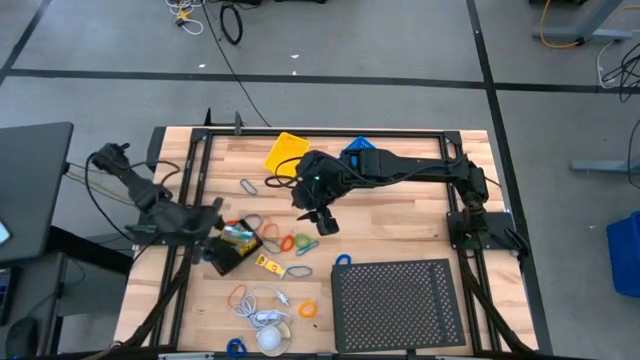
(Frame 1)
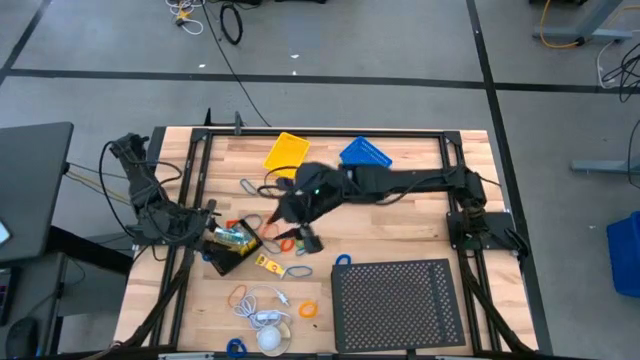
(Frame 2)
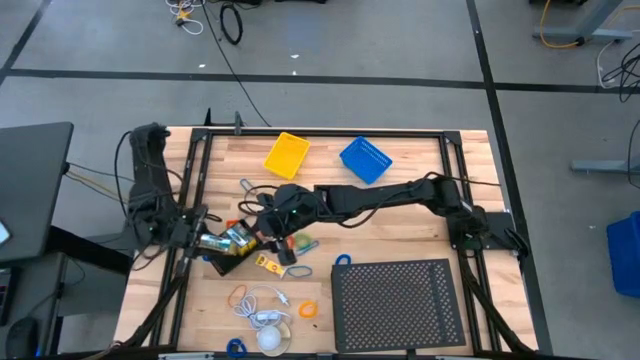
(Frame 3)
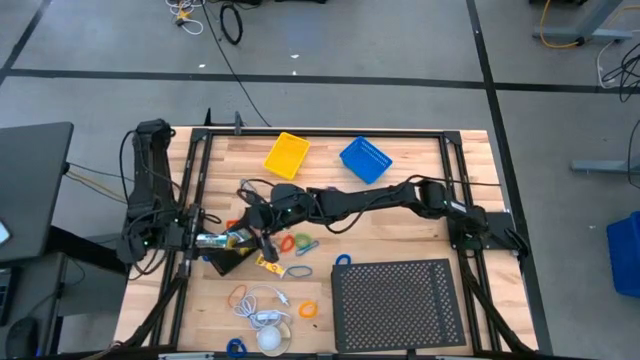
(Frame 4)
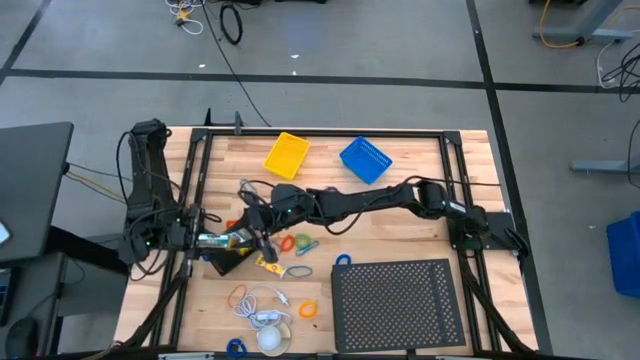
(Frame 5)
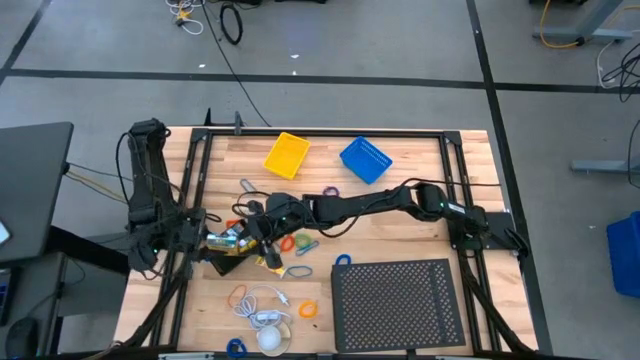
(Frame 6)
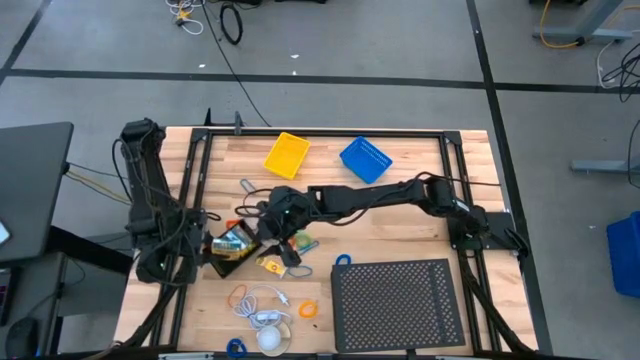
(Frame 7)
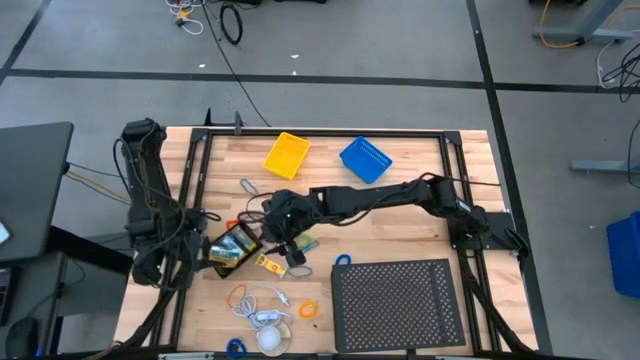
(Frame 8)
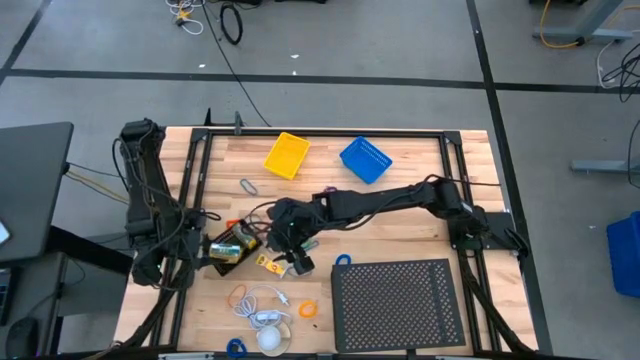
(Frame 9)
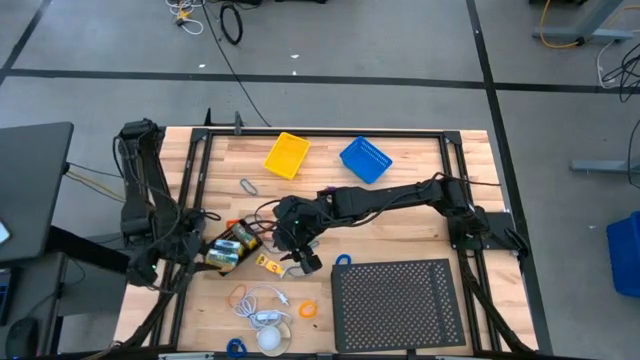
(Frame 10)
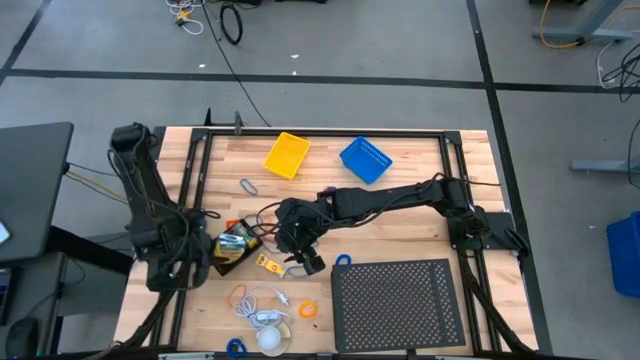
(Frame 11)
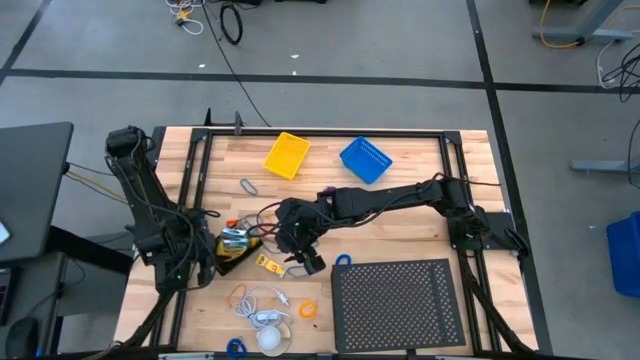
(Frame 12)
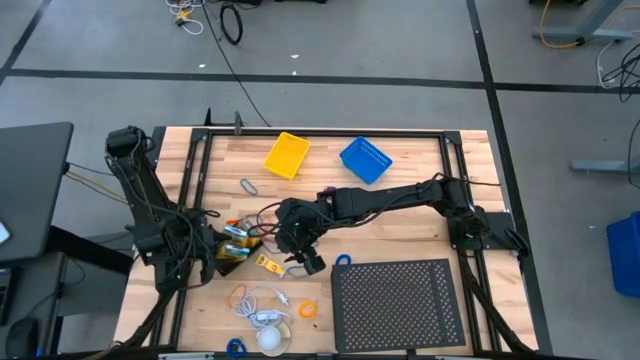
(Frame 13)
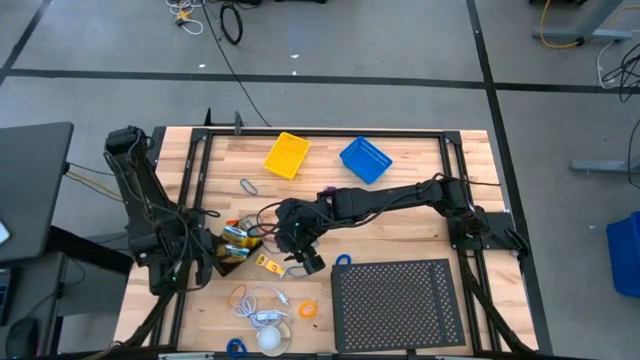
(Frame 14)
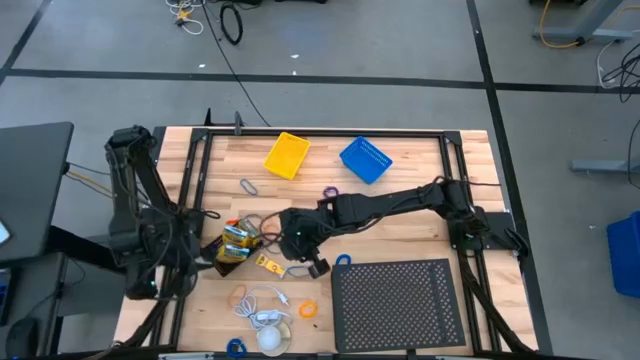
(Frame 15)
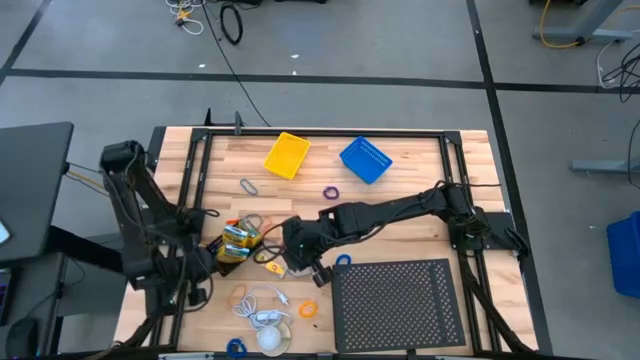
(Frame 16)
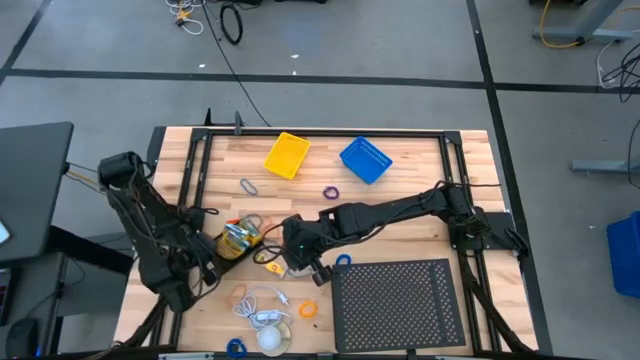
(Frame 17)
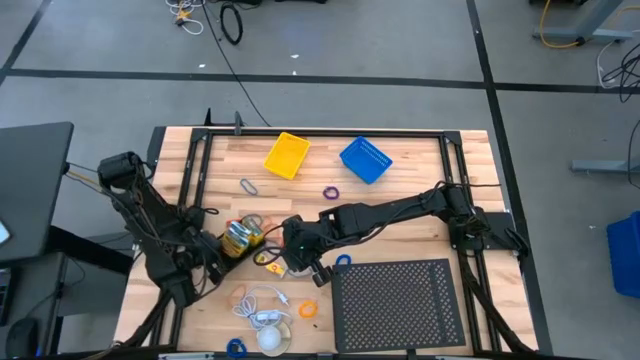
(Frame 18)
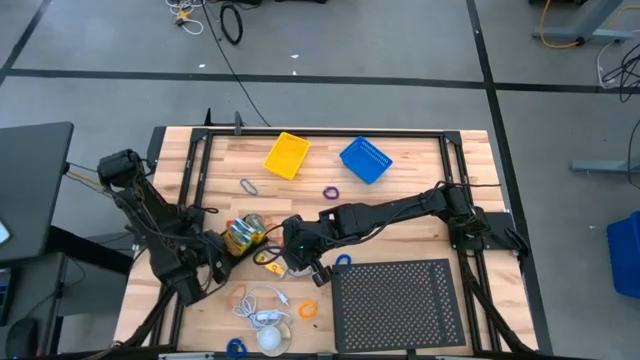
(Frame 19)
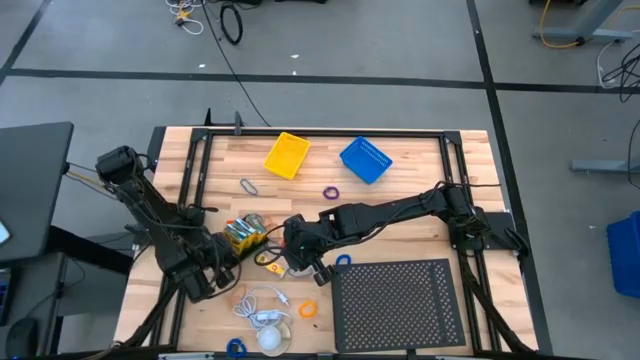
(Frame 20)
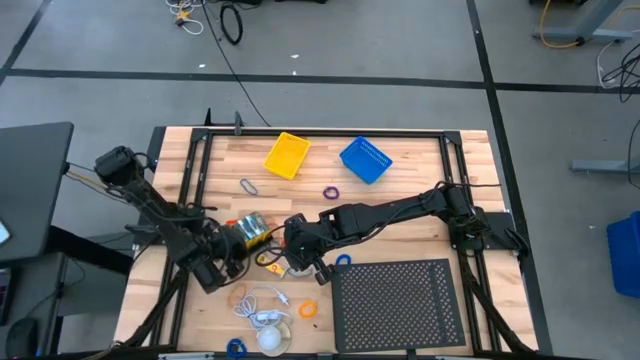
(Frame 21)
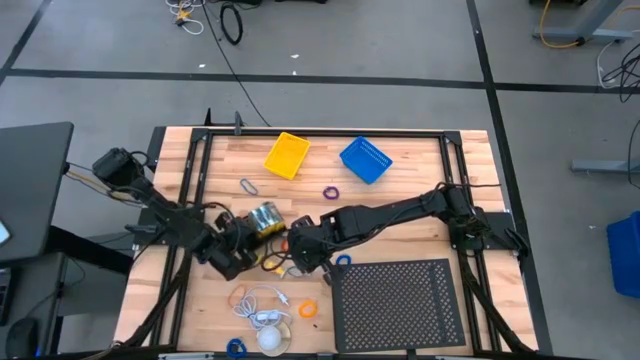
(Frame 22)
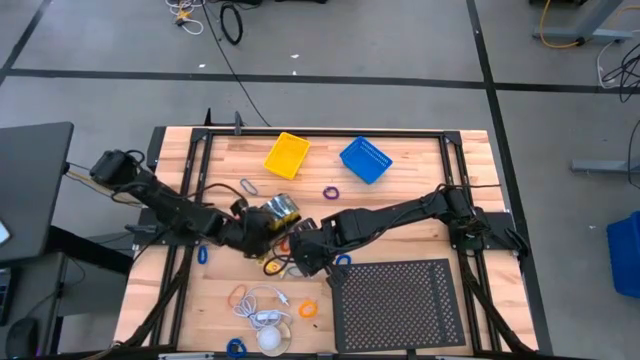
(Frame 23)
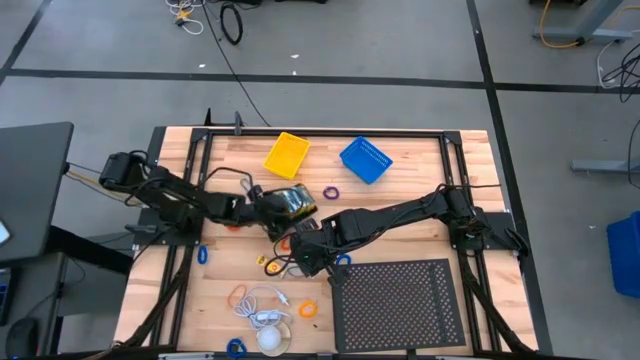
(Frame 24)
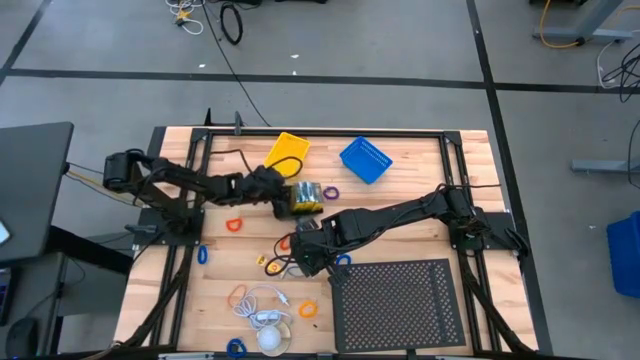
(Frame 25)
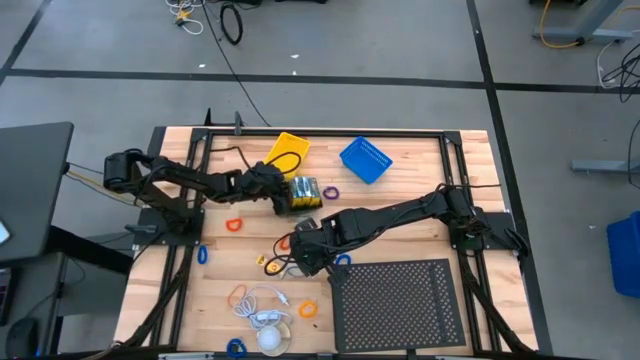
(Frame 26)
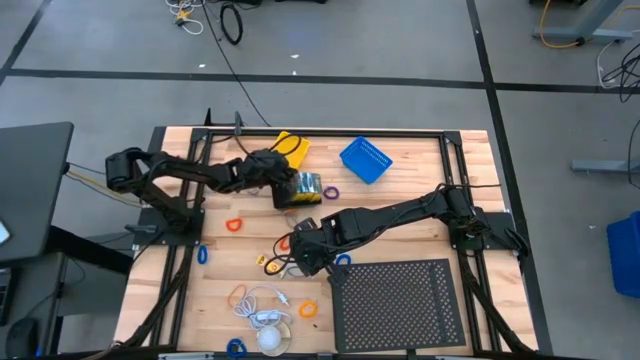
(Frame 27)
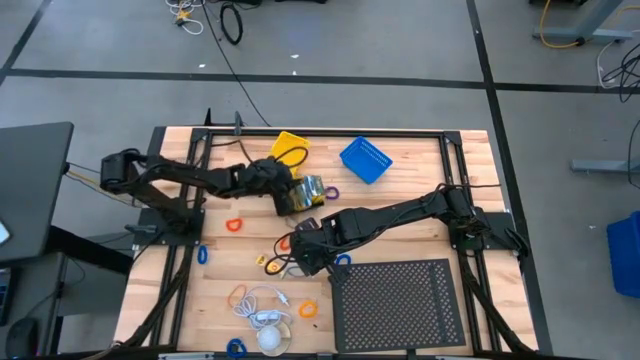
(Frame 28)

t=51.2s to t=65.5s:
Task: Pick & Place Office Desk Supplies
Put the crayon box into the black basket

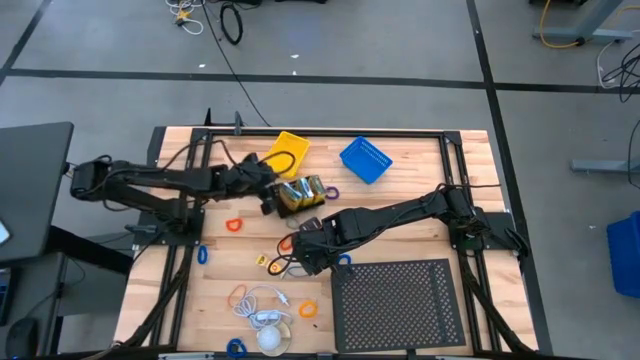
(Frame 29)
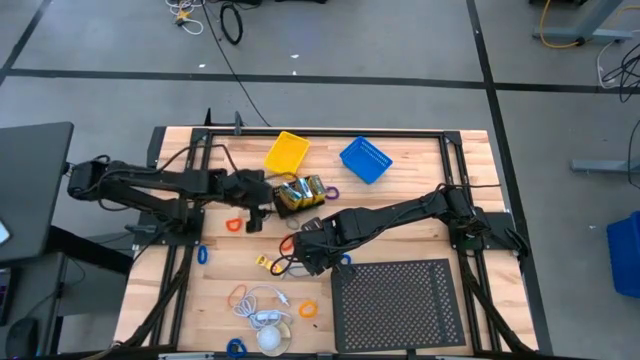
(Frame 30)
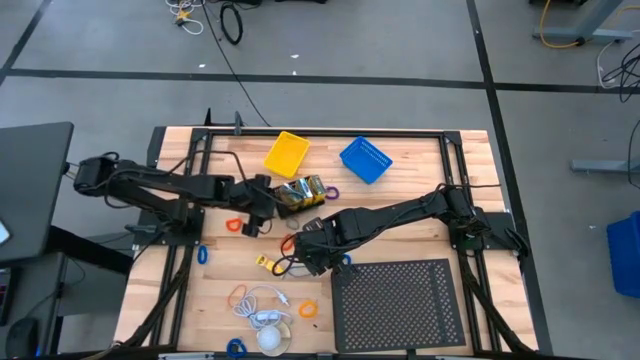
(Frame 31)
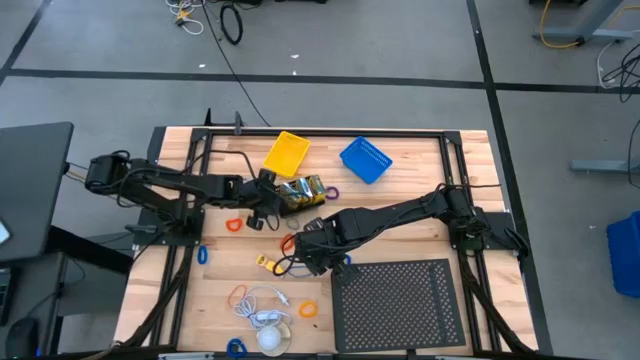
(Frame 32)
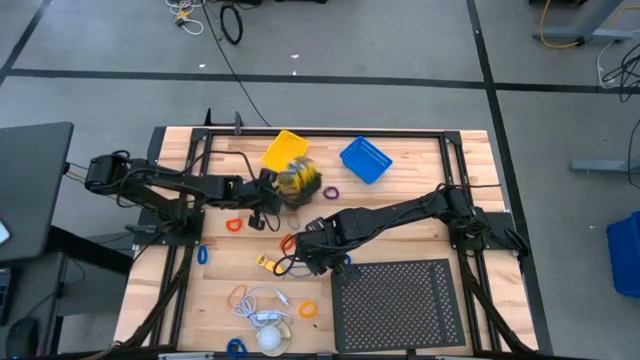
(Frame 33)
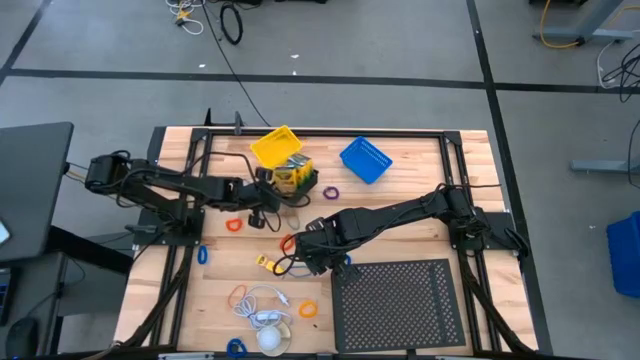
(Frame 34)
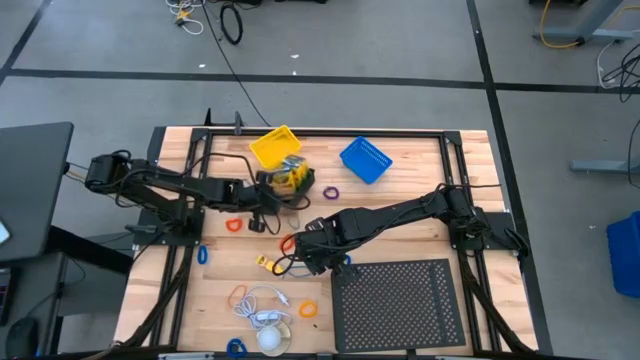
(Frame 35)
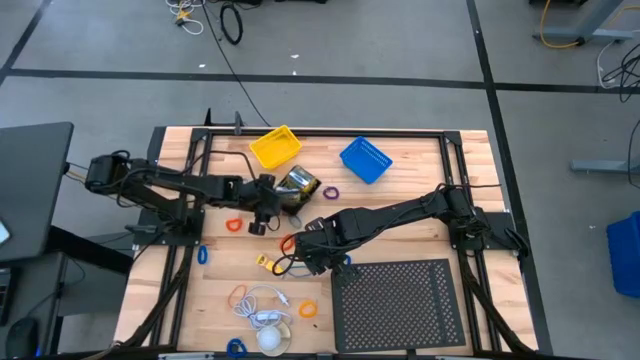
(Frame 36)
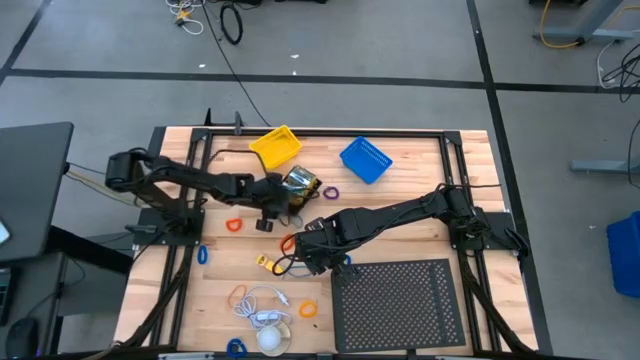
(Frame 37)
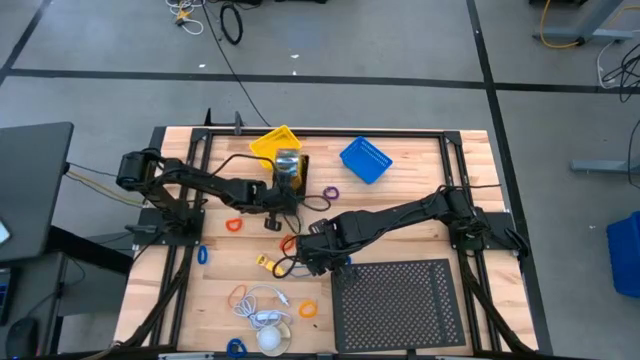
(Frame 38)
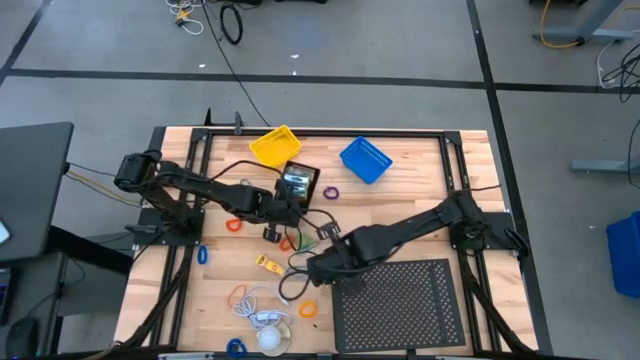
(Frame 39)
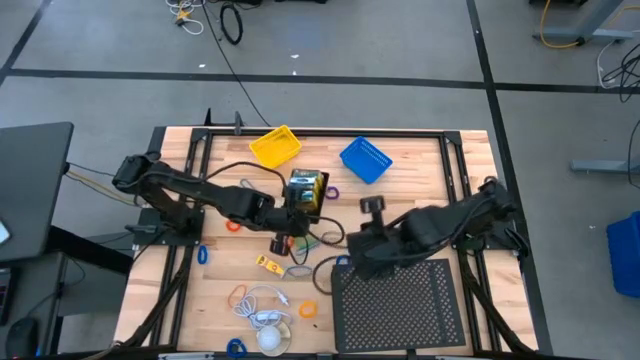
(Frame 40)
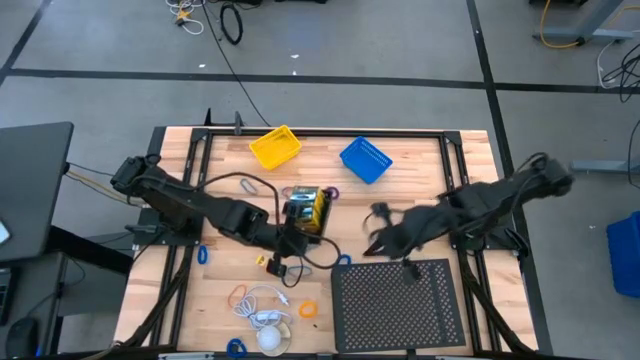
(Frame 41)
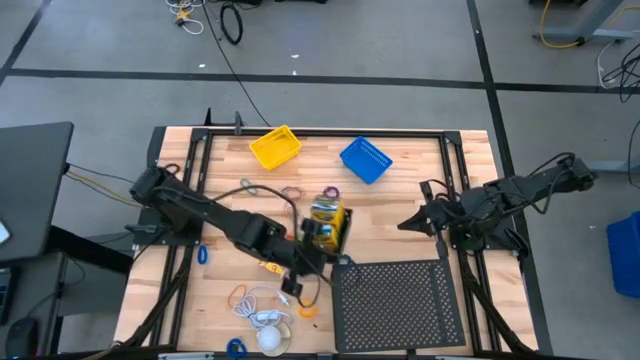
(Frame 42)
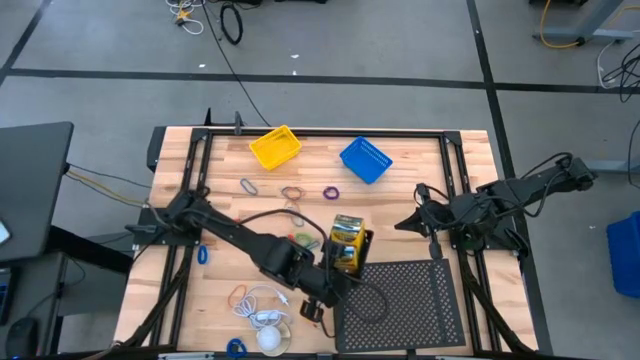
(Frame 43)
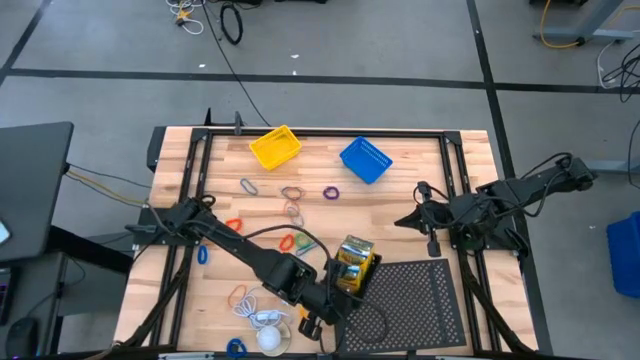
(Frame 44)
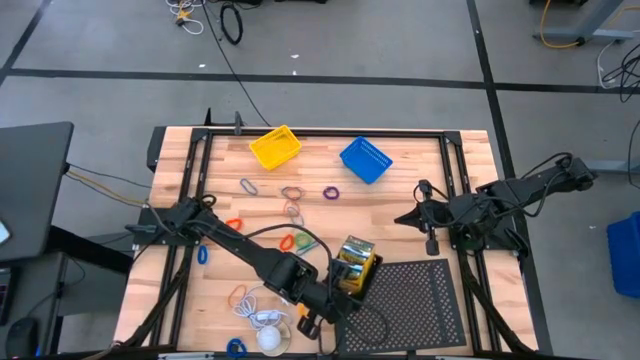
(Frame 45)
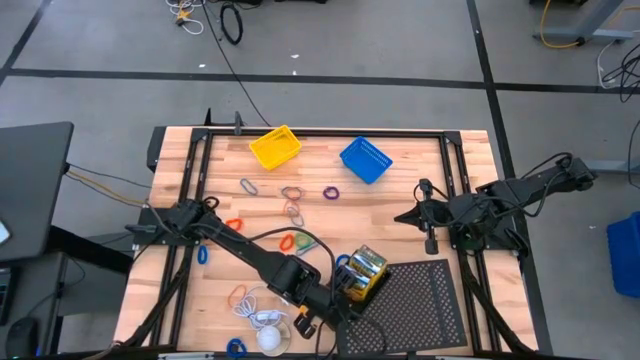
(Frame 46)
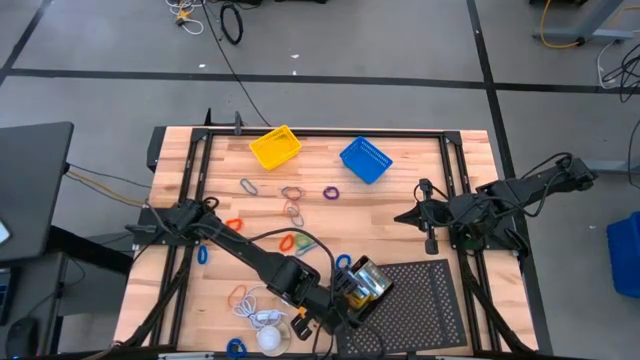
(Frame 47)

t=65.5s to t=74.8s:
Put the black basket filled with crayon box on the shelf
